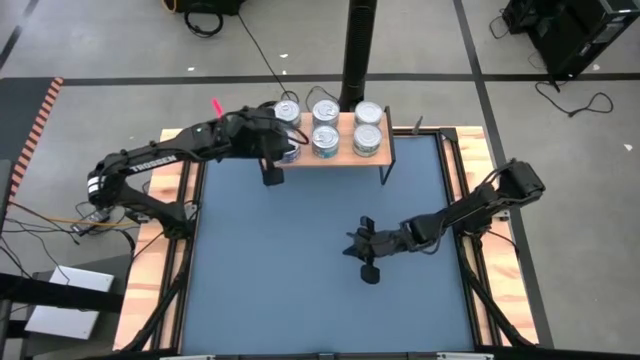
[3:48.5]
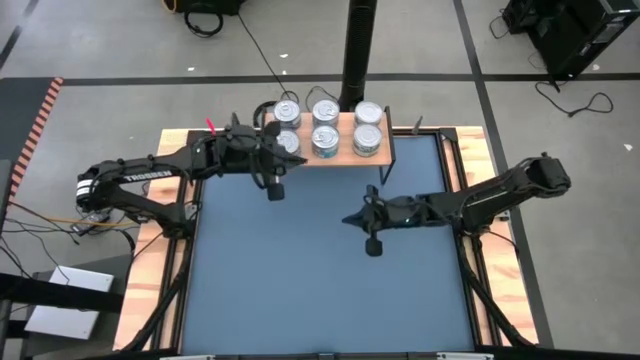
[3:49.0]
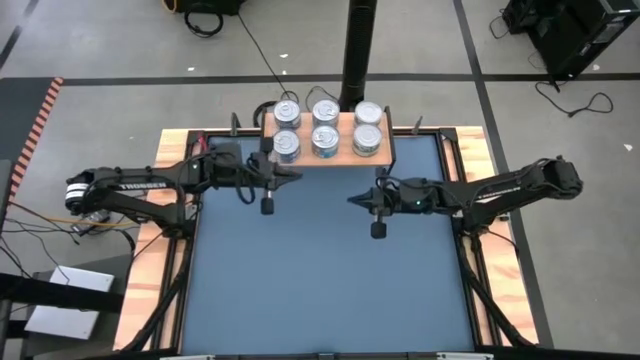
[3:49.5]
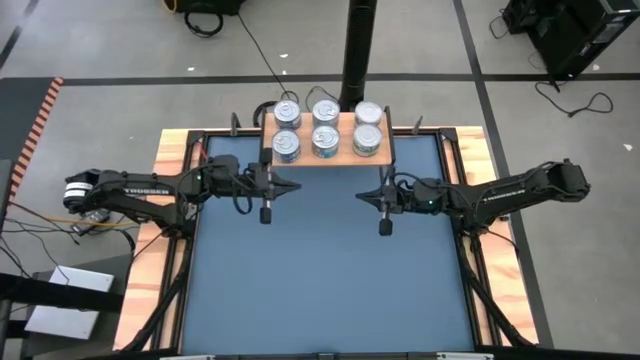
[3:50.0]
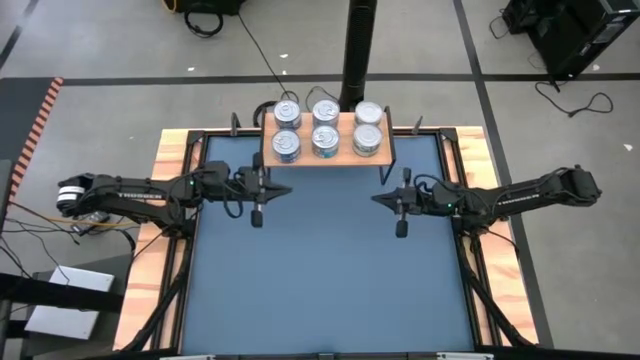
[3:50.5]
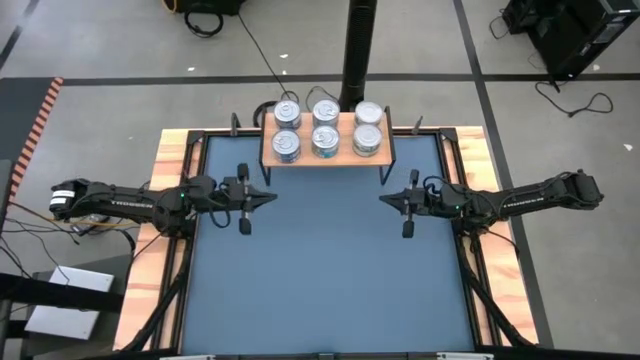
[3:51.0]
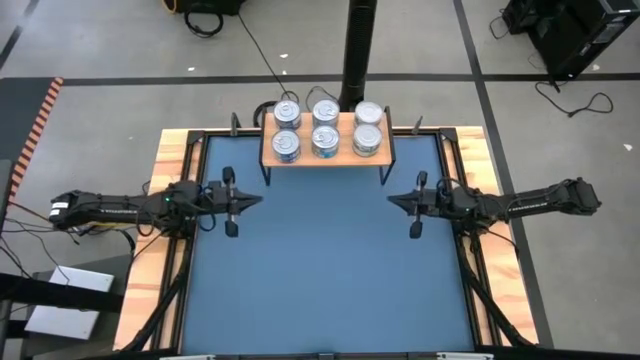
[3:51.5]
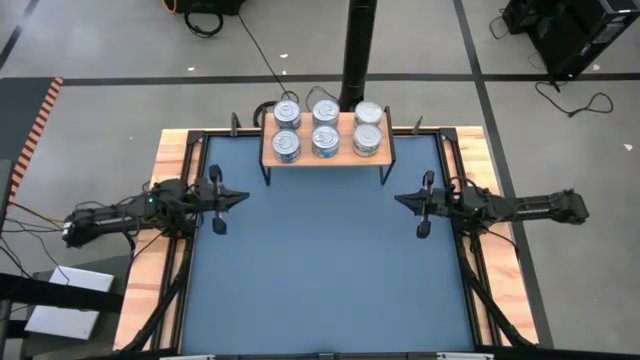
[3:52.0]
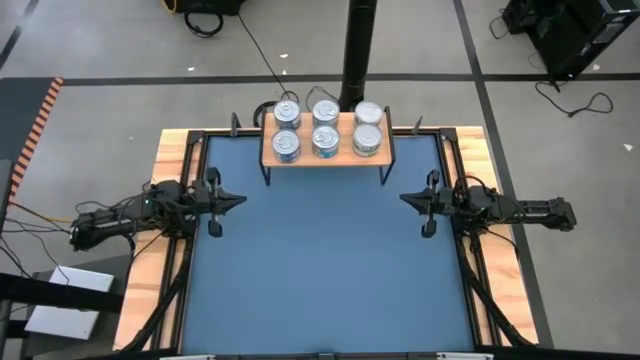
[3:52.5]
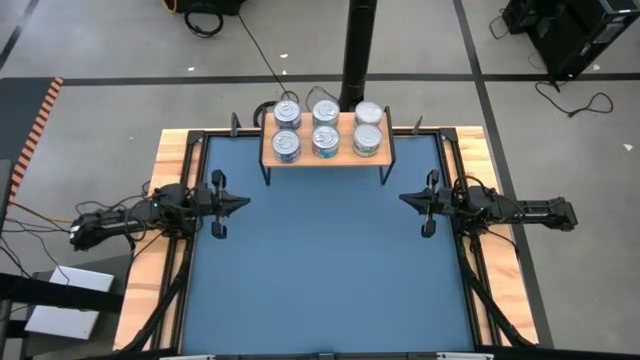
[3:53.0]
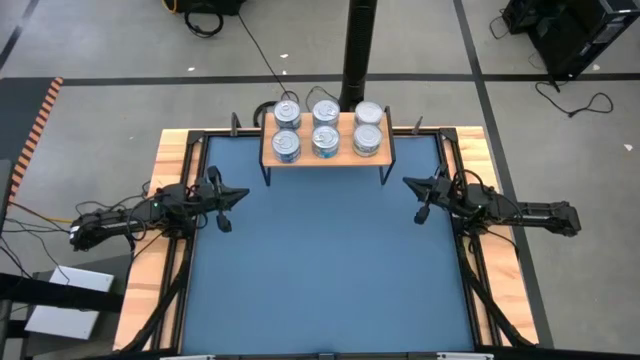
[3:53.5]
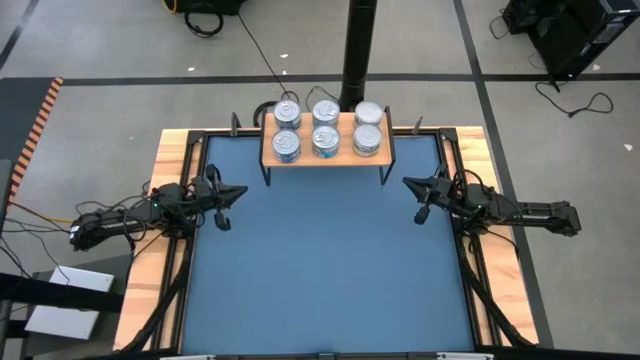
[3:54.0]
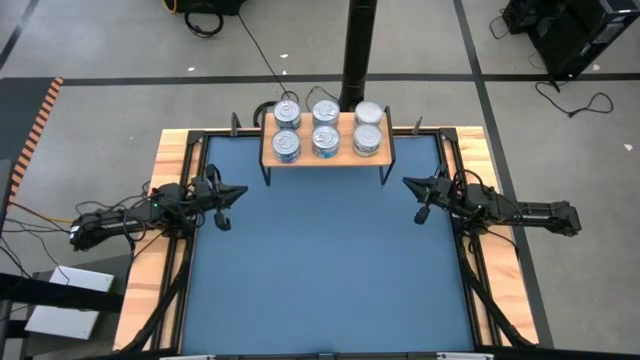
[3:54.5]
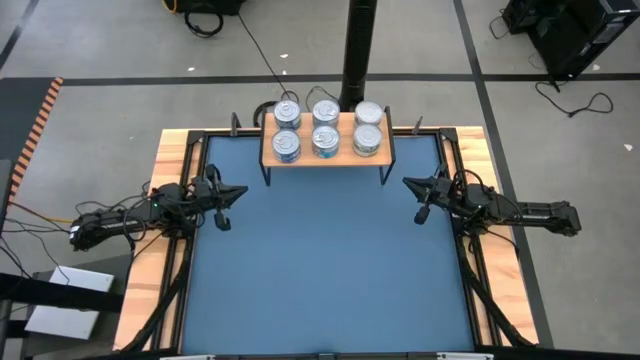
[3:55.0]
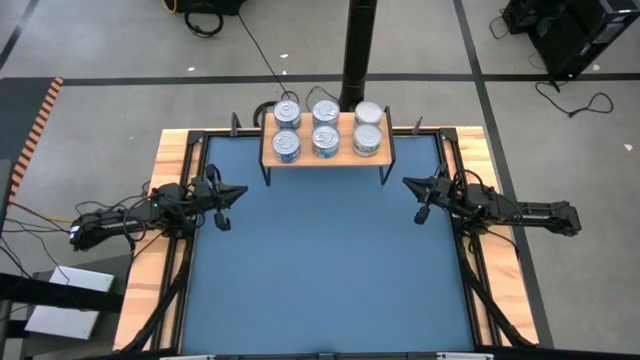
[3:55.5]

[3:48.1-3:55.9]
Task: Stack canned seafood by type on shelf
Return to Home Position

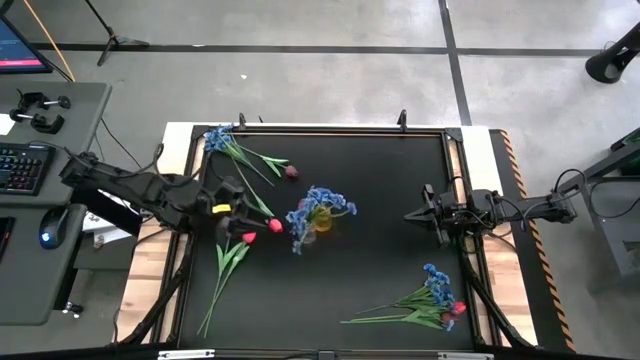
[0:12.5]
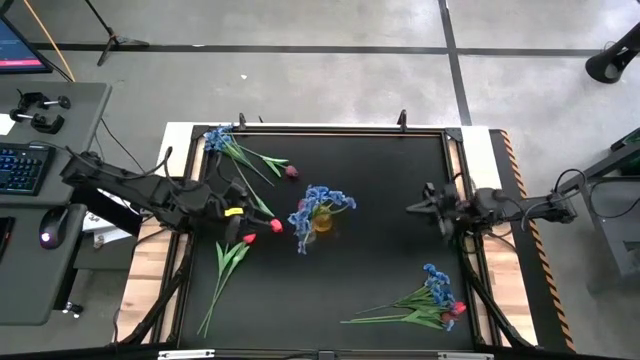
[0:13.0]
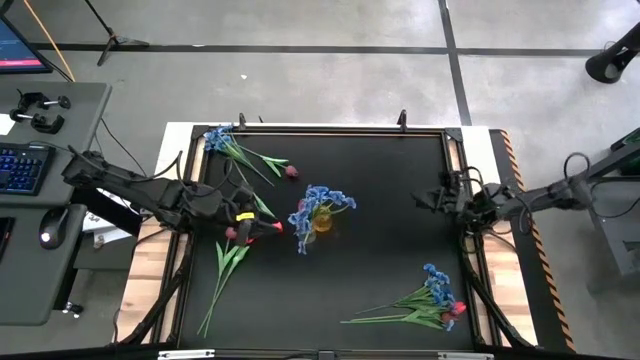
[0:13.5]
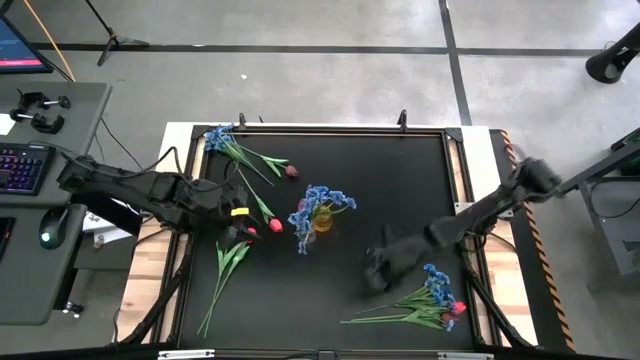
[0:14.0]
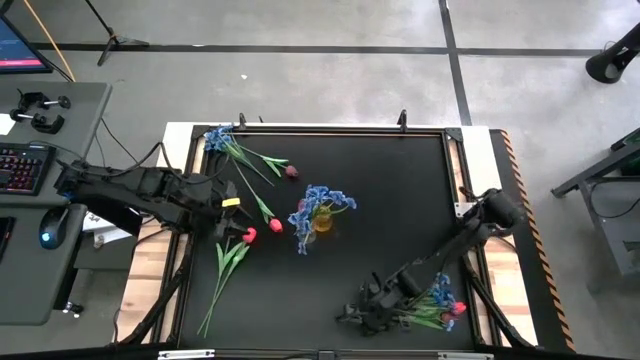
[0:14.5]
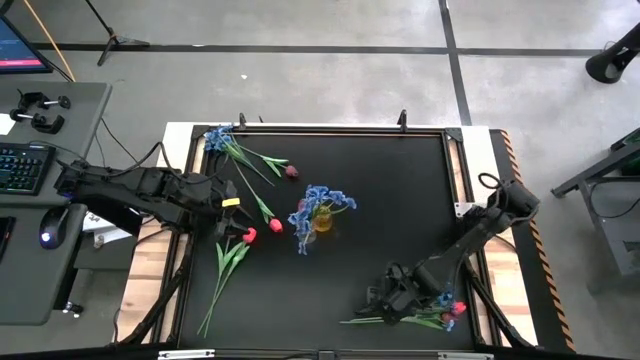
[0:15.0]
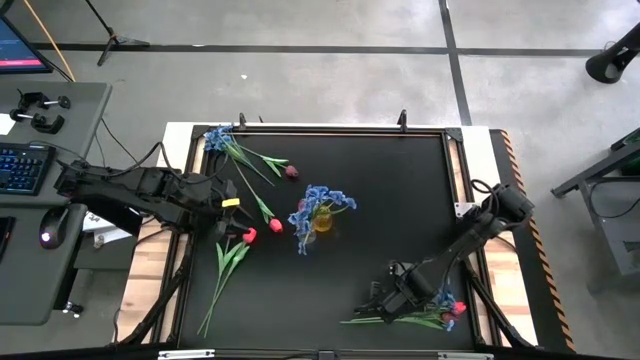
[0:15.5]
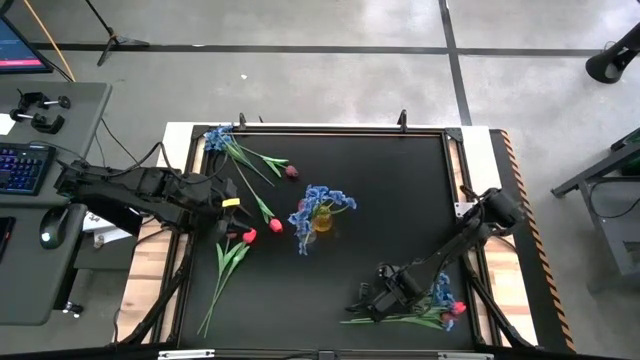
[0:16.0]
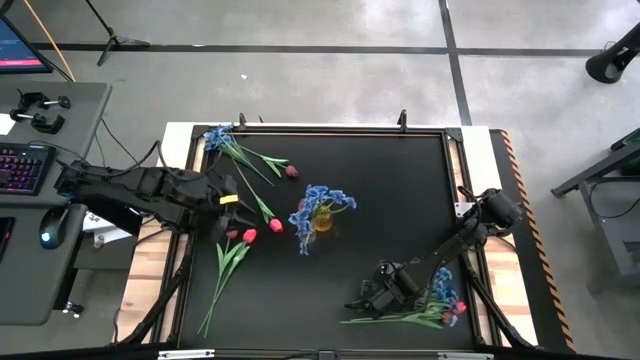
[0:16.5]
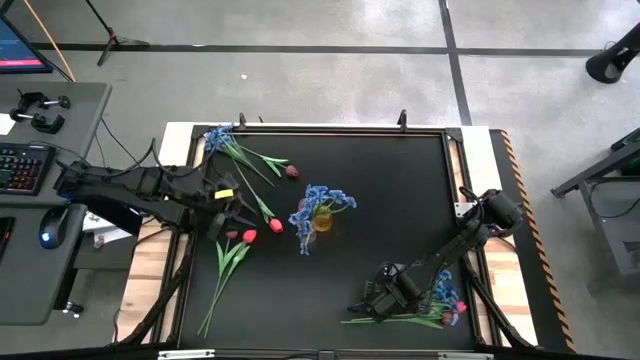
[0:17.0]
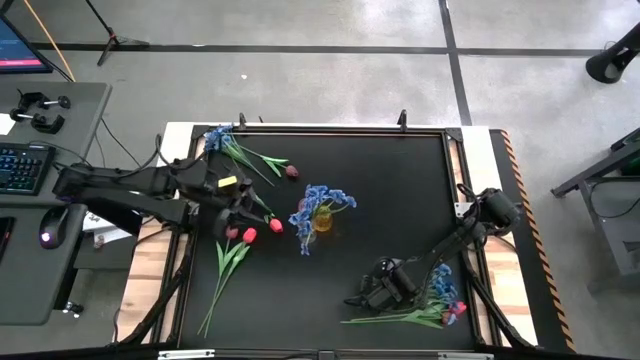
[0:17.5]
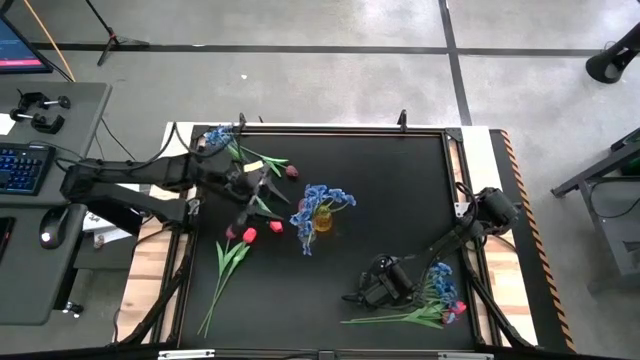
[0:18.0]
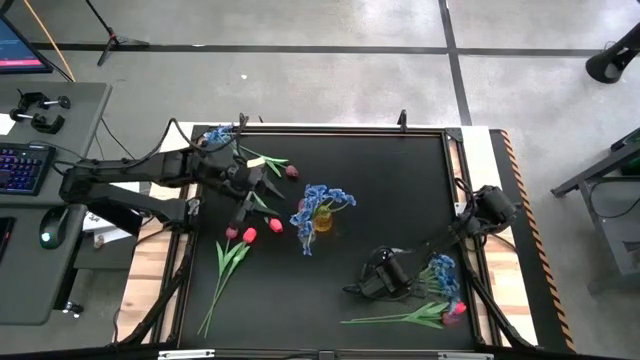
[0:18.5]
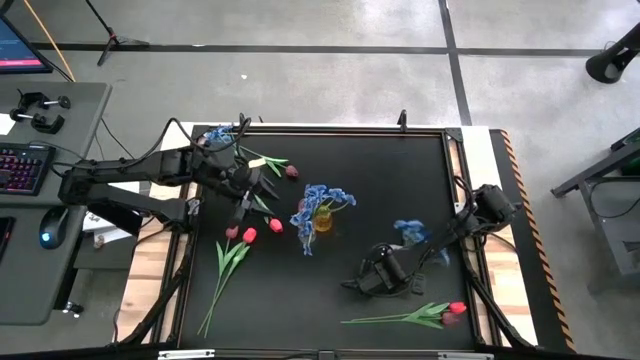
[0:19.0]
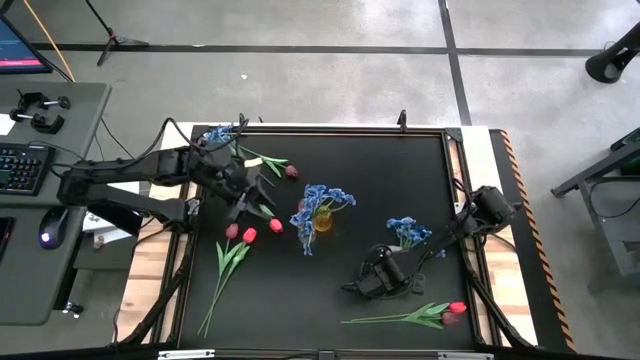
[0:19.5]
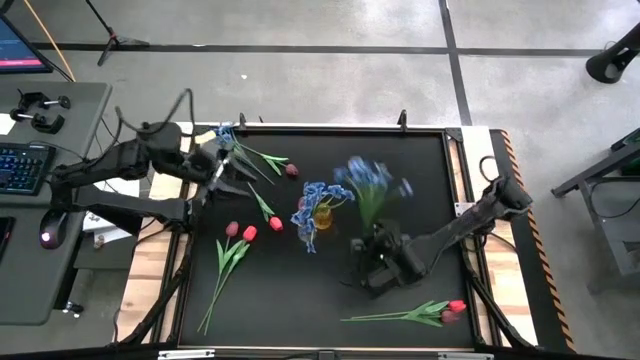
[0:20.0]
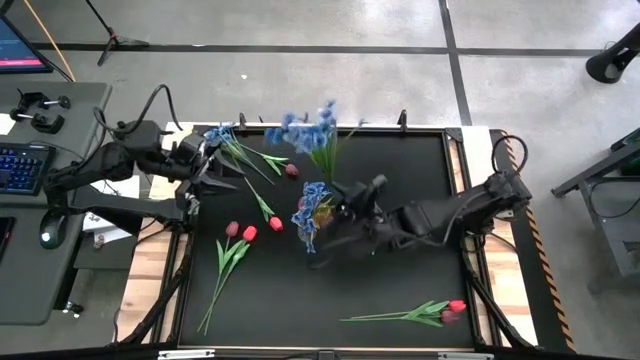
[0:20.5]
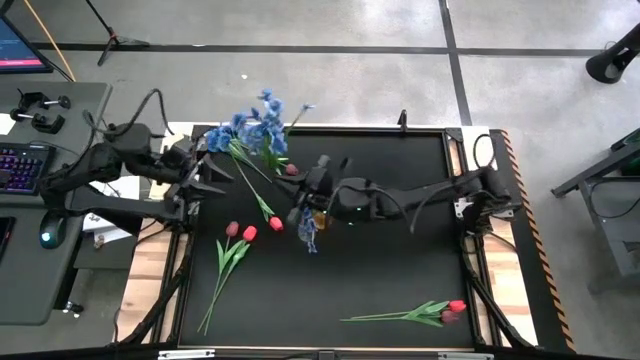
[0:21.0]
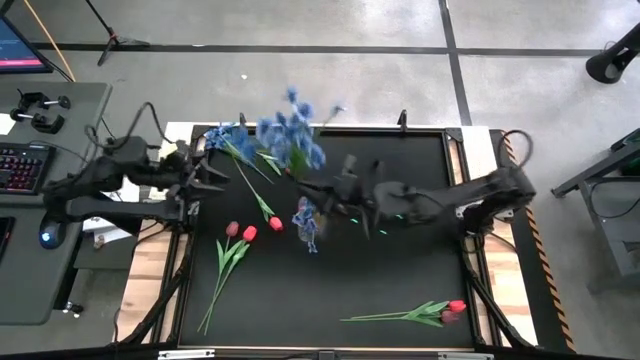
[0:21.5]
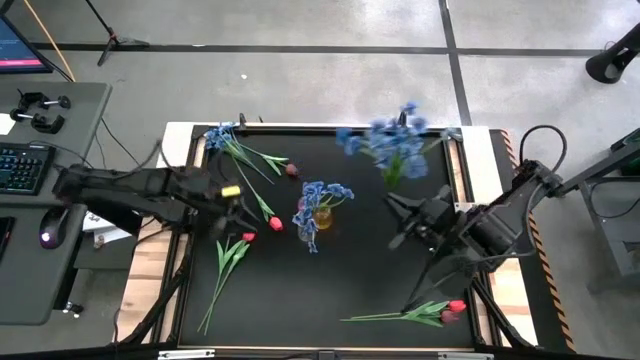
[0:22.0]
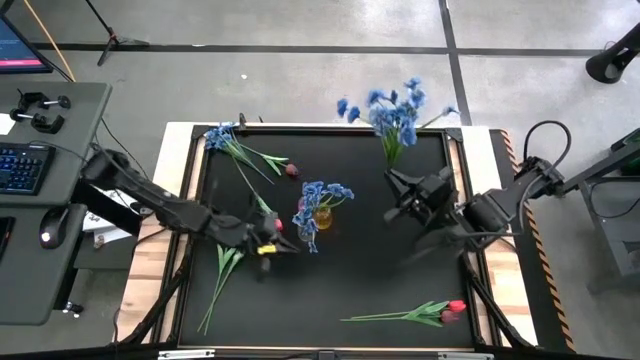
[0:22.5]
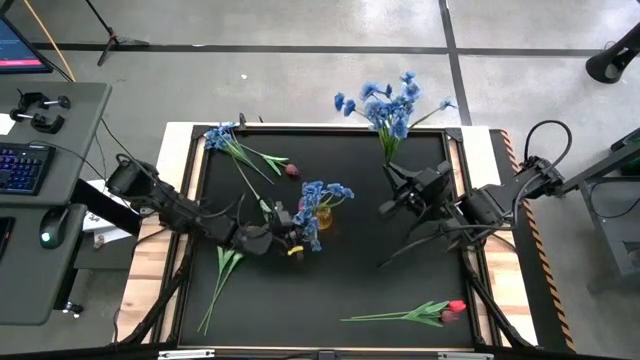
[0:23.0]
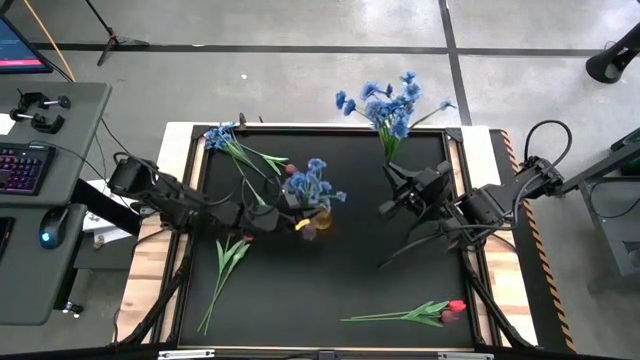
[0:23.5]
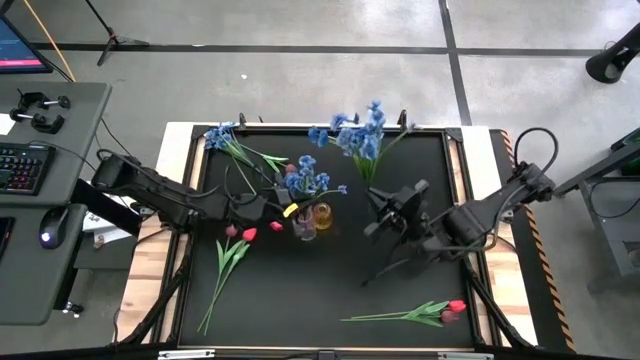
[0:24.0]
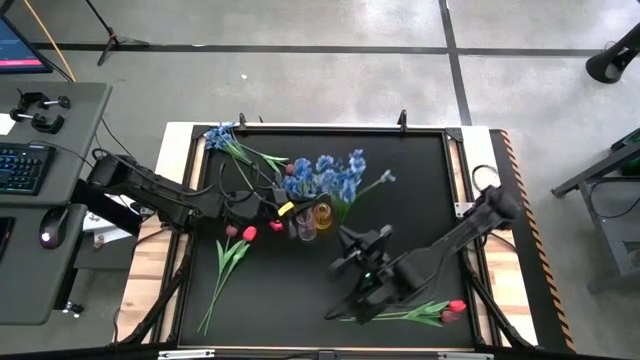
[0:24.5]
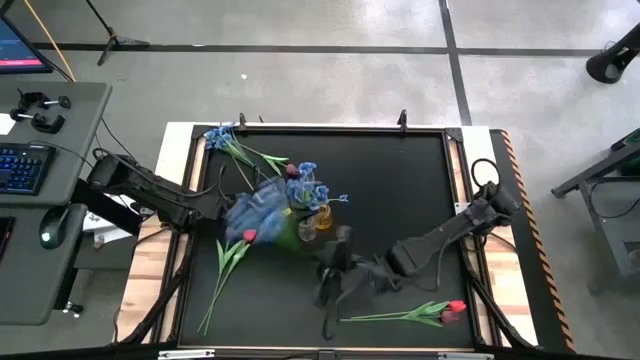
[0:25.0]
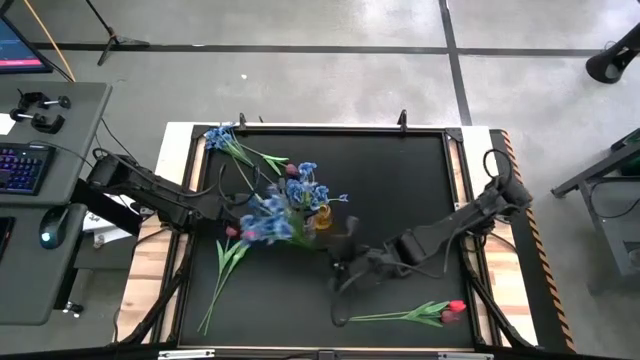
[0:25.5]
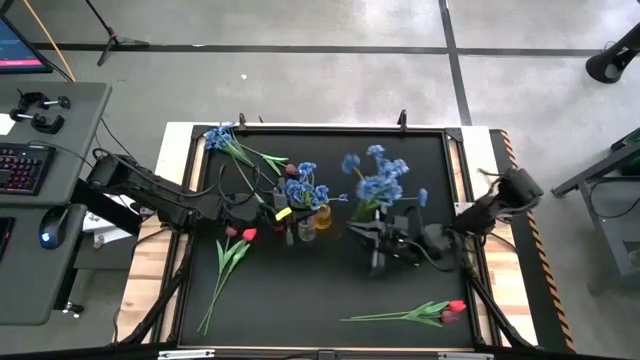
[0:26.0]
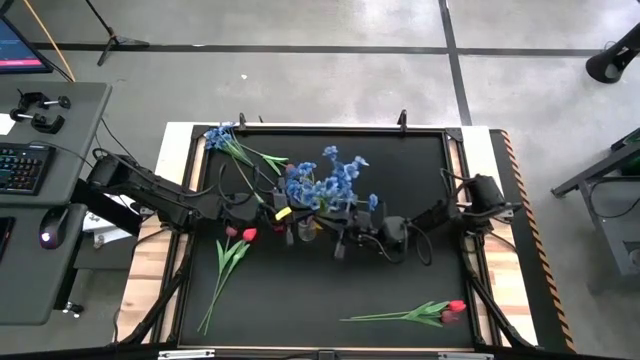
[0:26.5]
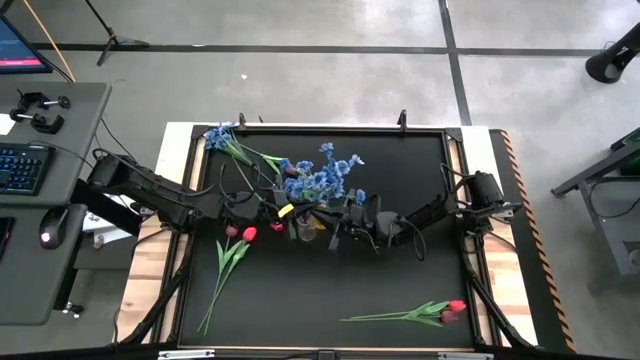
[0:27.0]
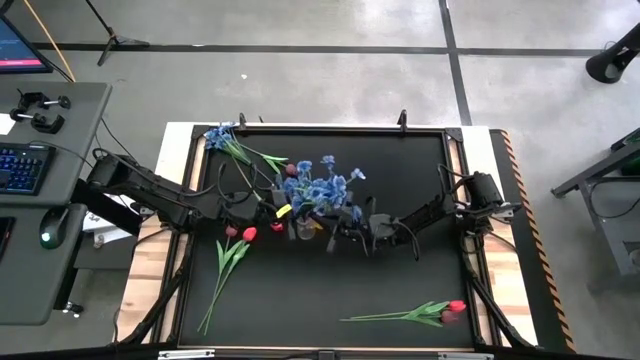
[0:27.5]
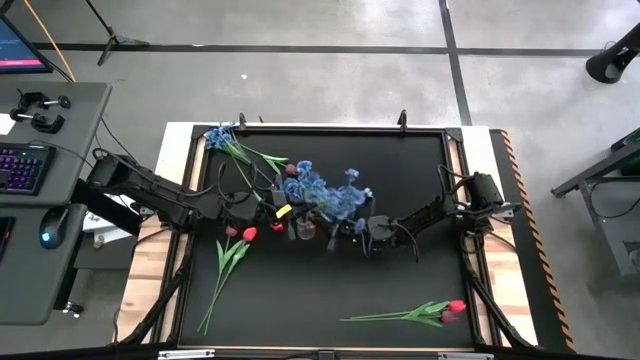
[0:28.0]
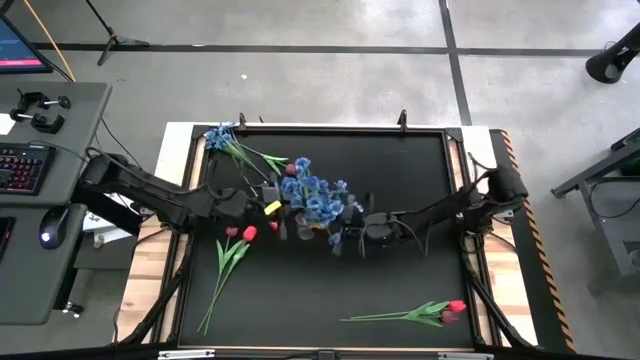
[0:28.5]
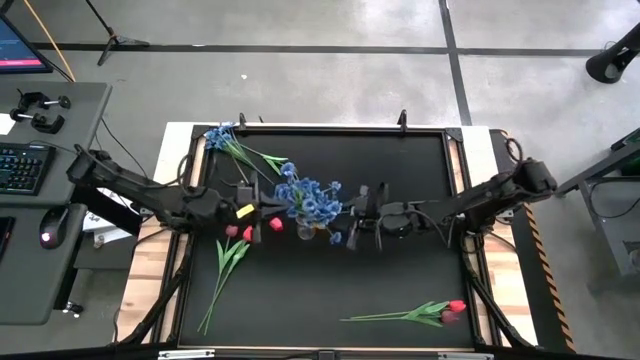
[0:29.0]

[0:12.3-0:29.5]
Task: Sort flowers into vase by color
Put the bottom blue flower into the transparent vase
